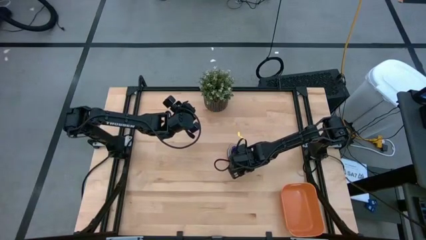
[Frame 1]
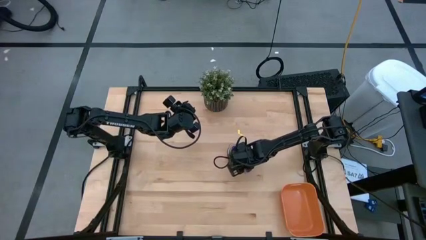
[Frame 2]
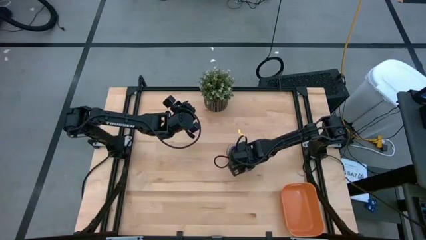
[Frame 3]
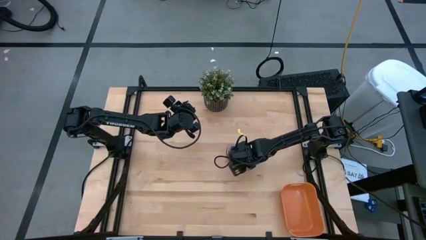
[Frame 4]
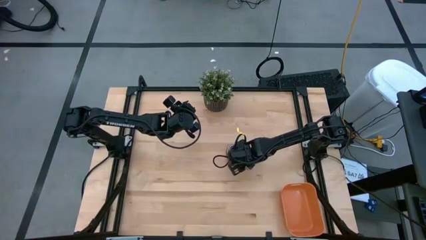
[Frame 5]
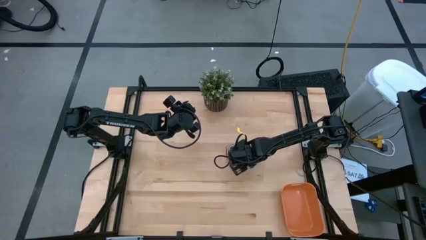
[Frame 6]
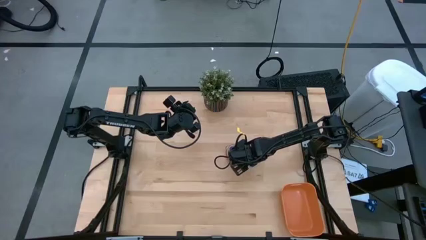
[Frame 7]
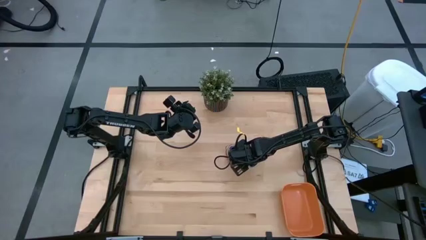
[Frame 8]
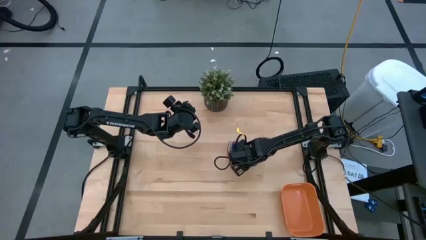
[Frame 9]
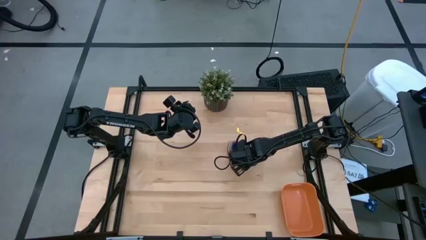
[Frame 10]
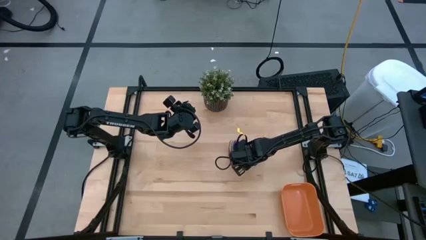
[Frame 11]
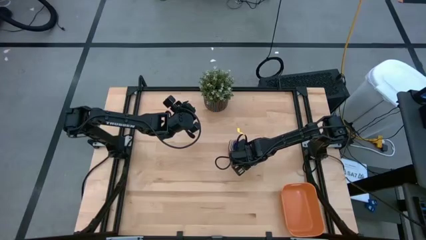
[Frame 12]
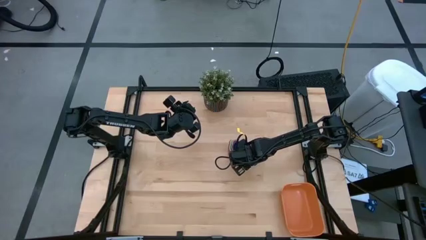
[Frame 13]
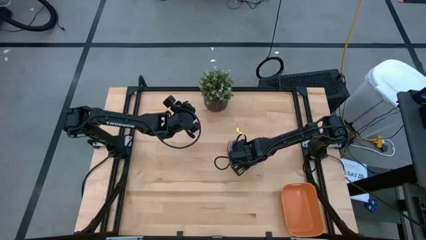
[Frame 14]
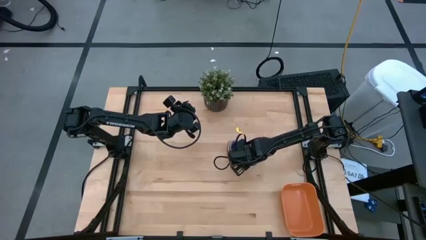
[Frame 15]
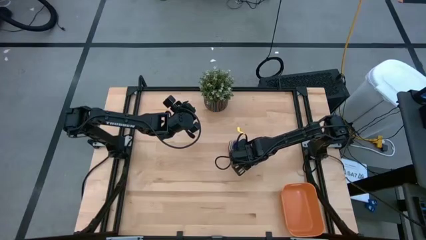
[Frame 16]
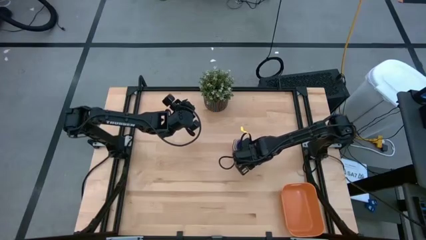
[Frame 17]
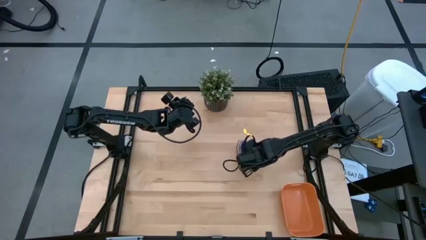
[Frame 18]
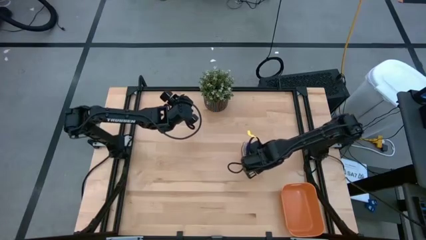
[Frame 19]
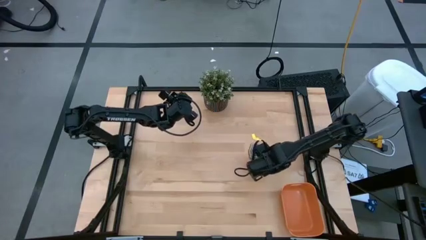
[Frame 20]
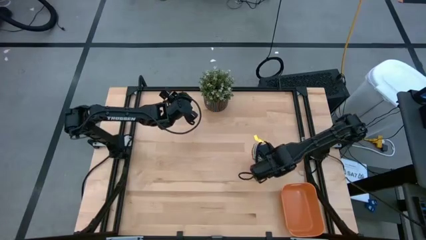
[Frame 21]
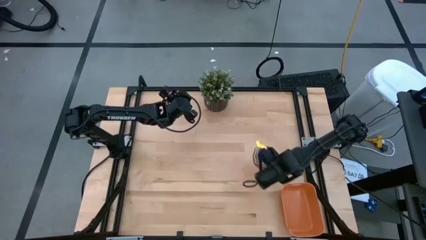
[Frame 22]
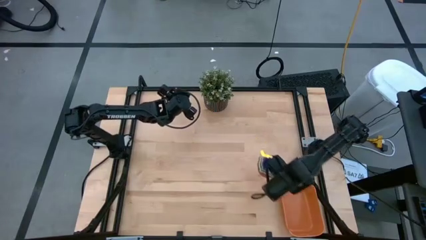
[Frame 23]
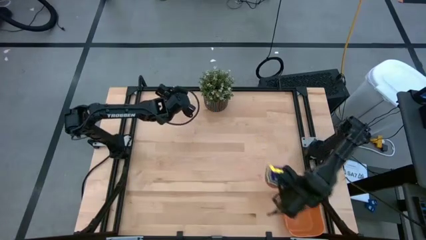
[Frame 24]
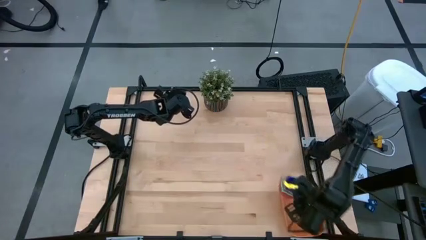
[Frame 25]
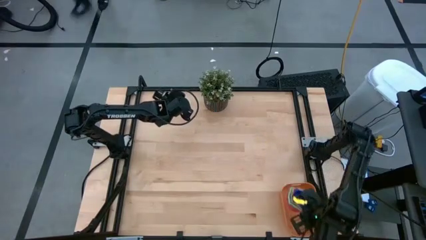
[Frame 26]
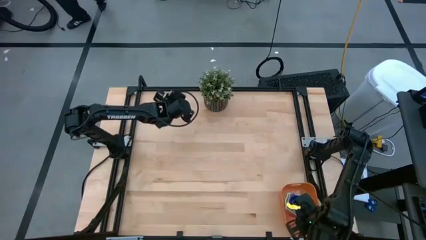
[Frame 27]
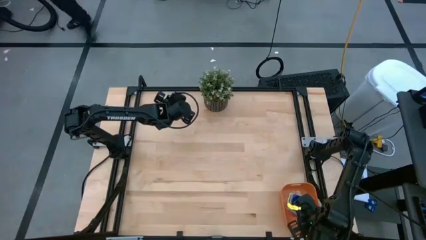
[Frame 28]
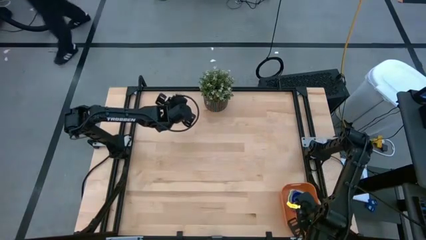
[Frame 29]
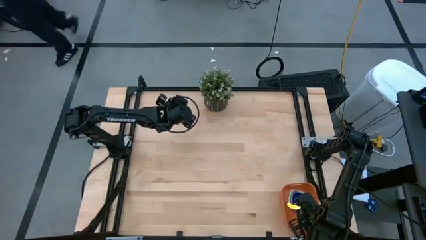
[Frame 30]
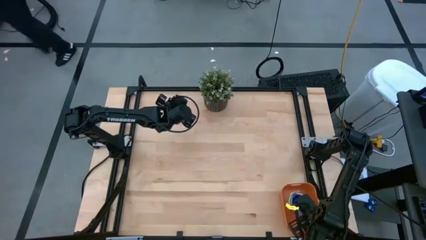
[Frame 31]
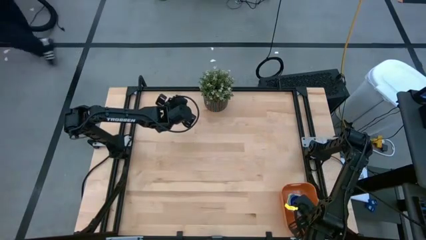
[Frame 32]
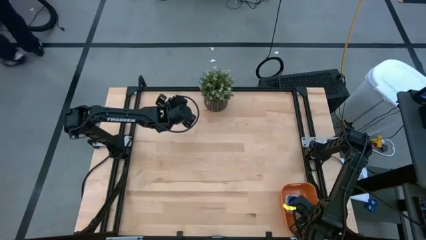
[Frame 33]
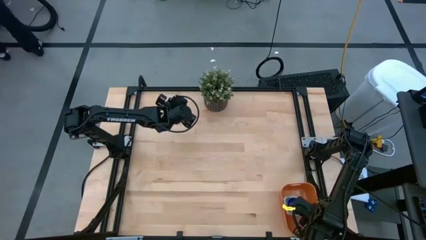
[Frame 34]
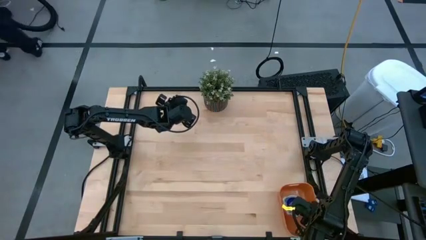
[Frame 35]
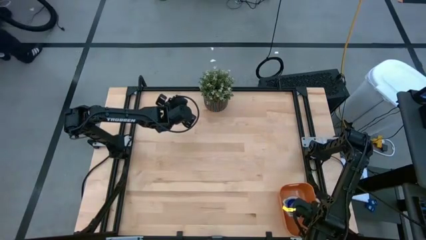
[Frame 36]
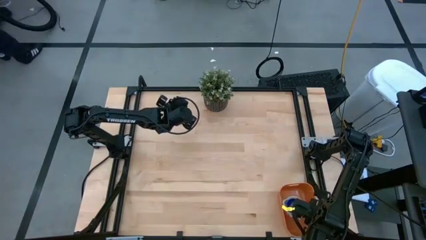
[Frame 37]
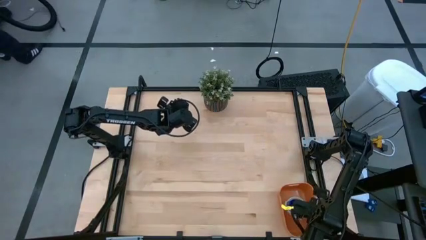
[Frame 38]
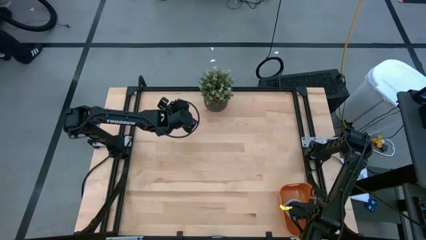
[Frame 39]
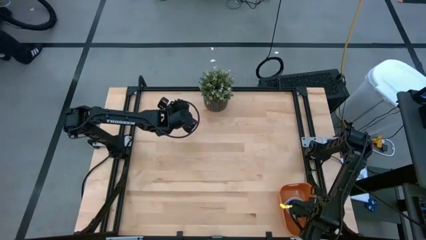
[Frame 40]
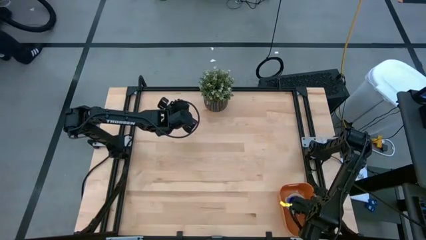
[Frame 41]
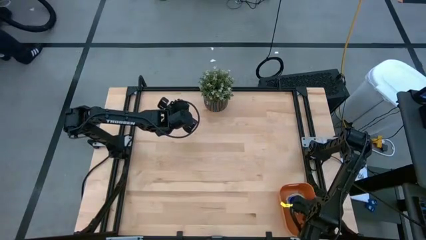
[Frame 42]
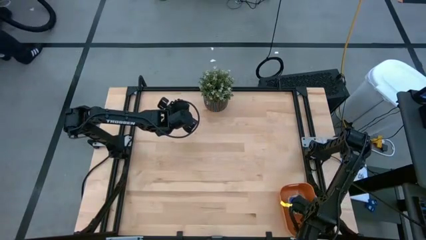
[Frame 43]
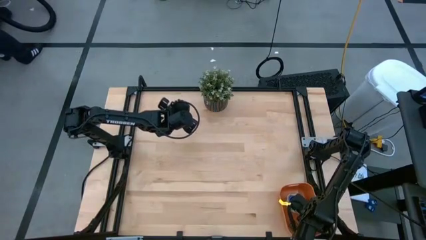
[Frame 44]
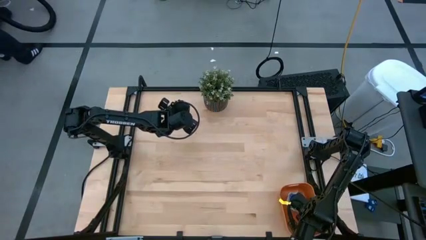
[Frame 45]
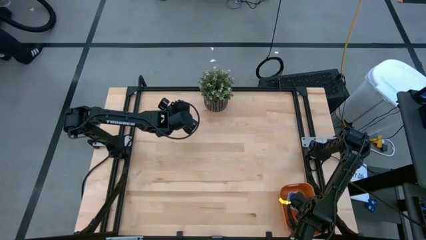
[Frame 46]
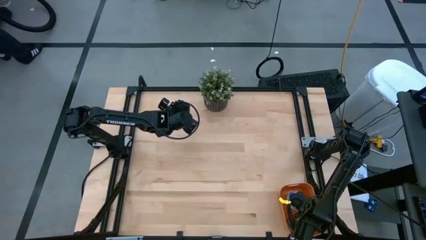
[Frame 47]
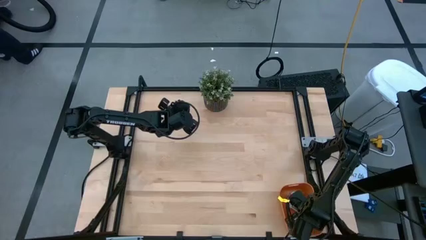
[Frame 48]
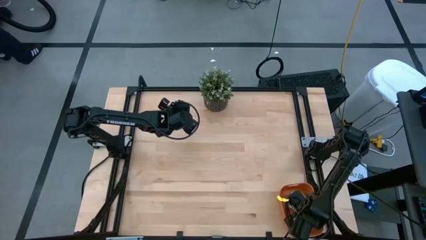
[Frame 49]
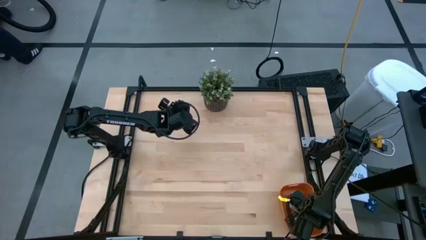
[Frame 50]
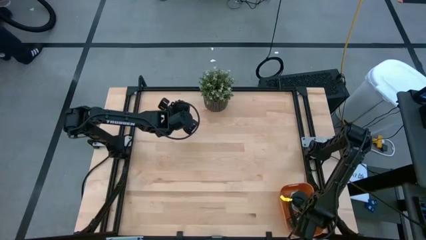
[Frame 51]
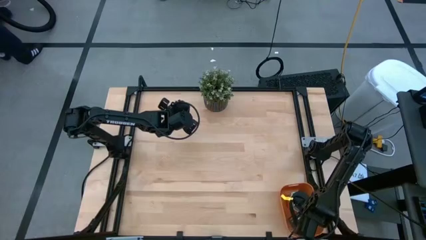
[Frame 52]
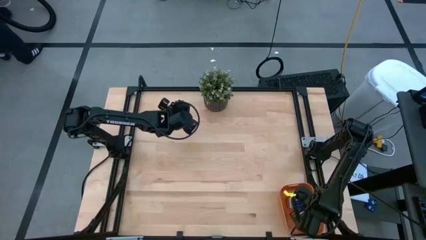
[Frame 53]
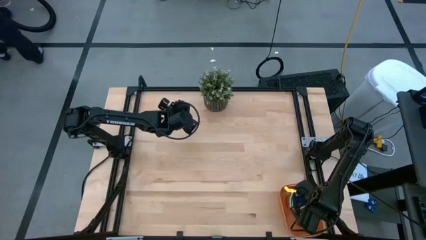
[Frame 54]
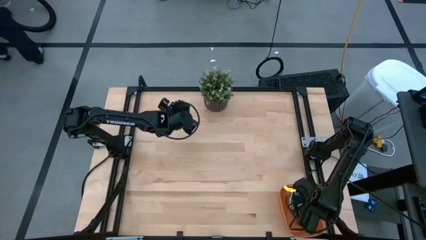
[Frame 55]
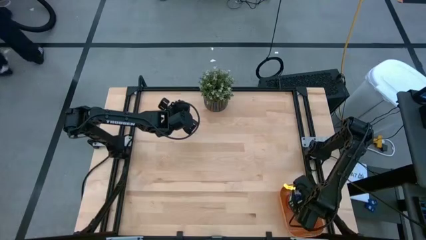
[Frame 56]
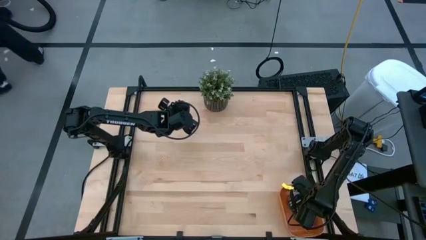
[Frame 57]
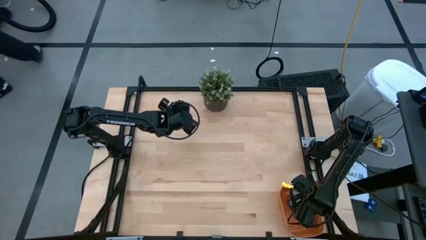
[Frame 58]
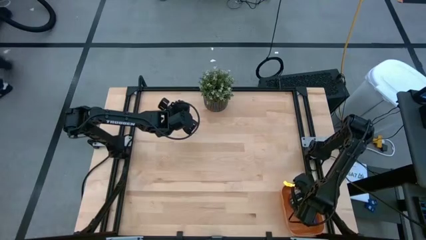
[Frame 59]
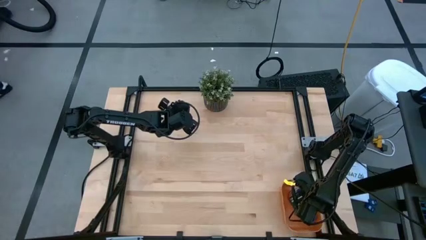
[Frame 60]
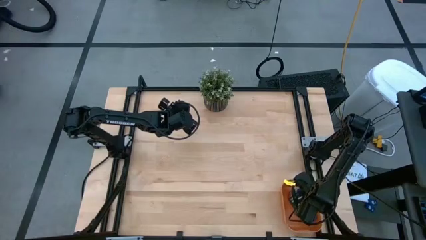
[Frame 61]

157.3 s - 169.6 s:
Task: Nest measuring cups in basket
Put the nested measuring cups into the orange bin
